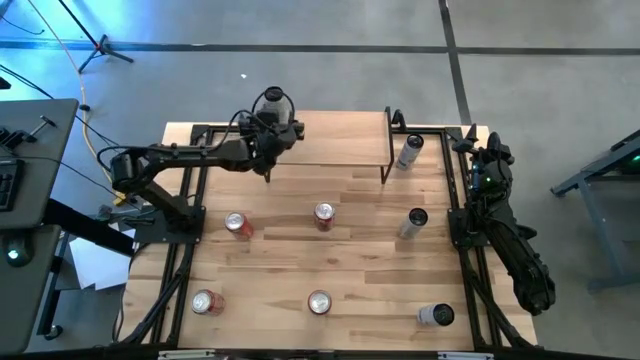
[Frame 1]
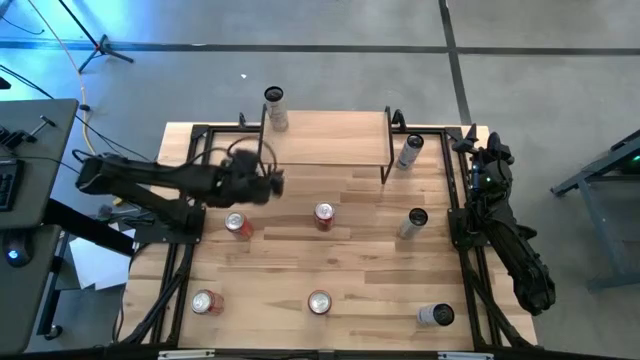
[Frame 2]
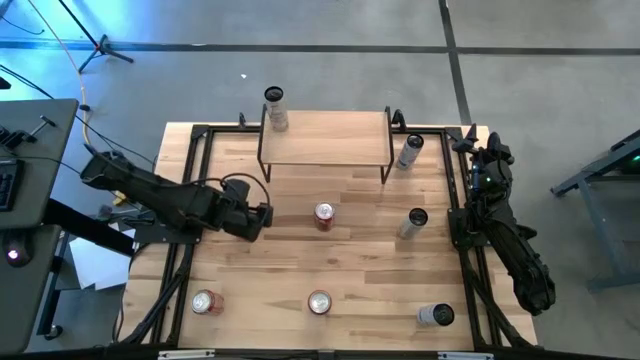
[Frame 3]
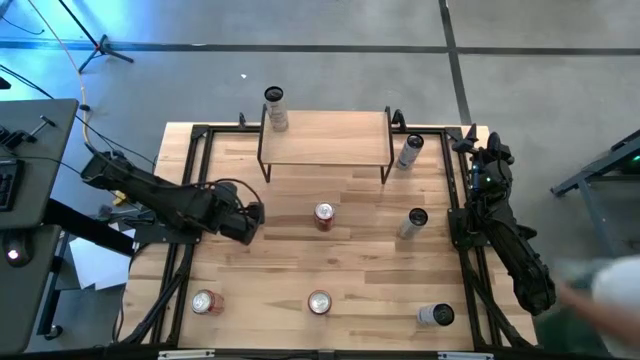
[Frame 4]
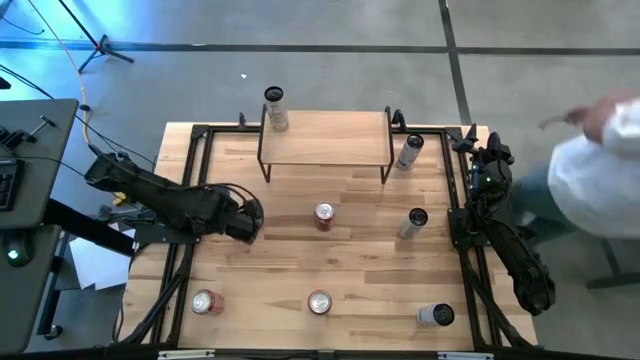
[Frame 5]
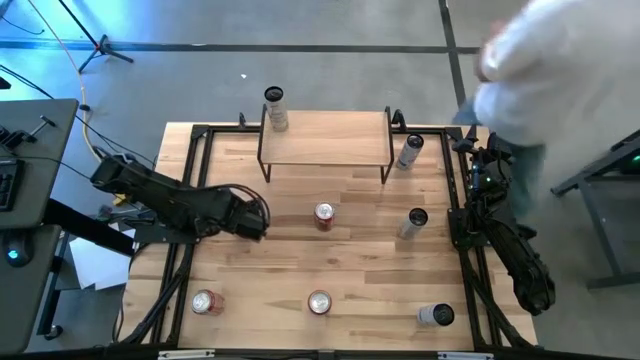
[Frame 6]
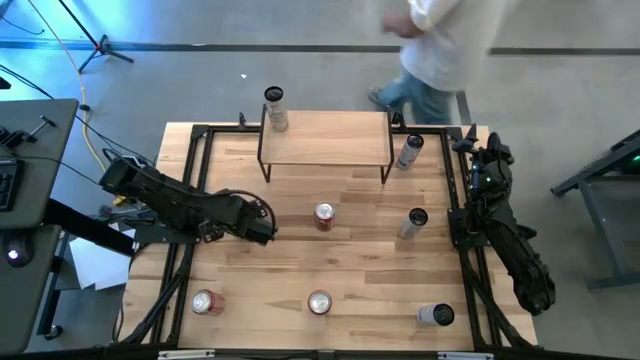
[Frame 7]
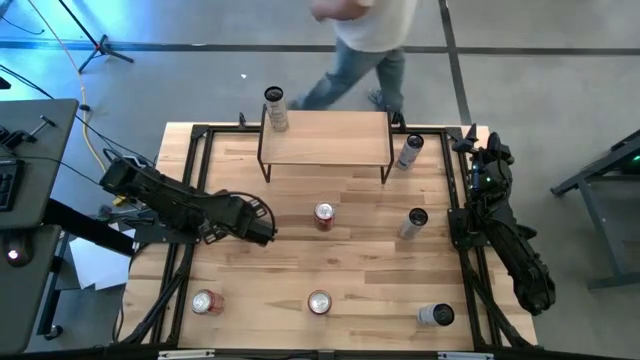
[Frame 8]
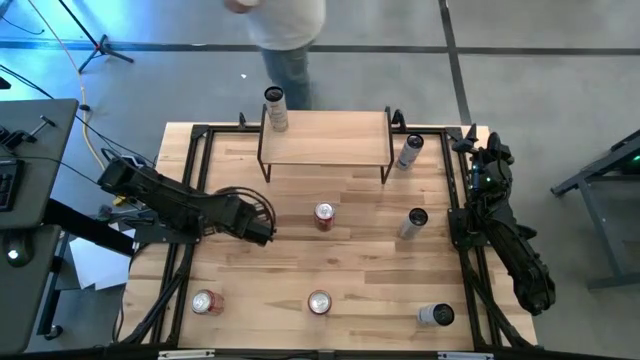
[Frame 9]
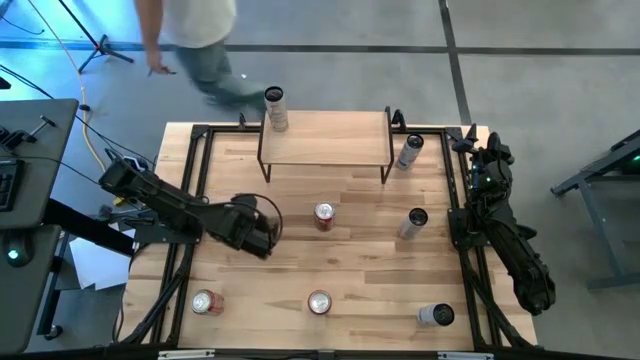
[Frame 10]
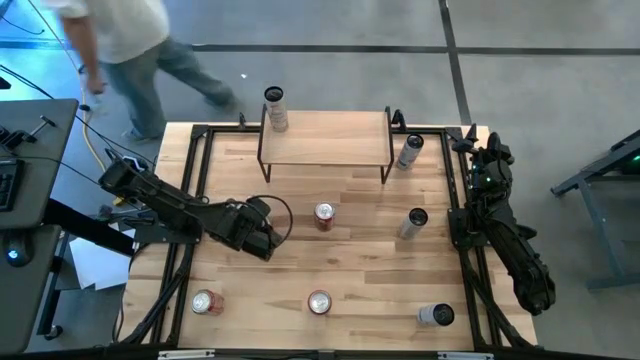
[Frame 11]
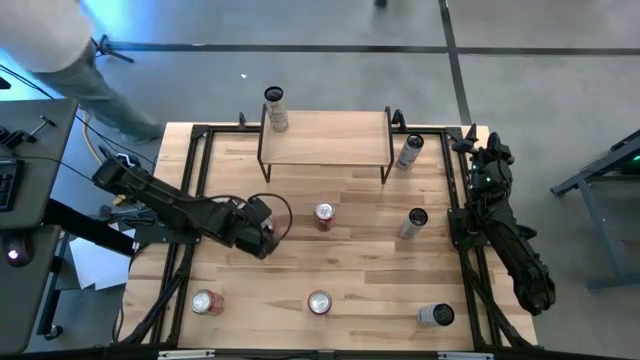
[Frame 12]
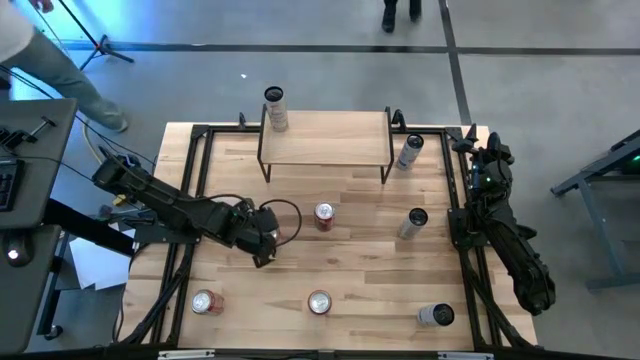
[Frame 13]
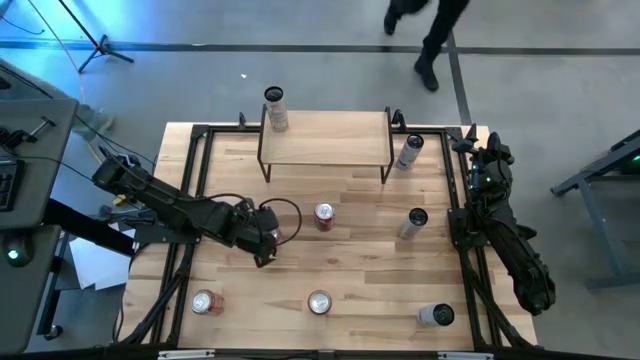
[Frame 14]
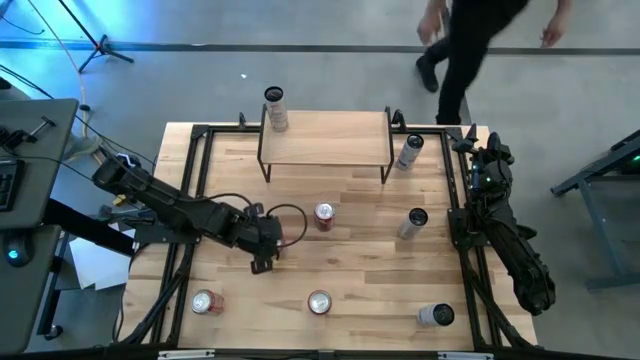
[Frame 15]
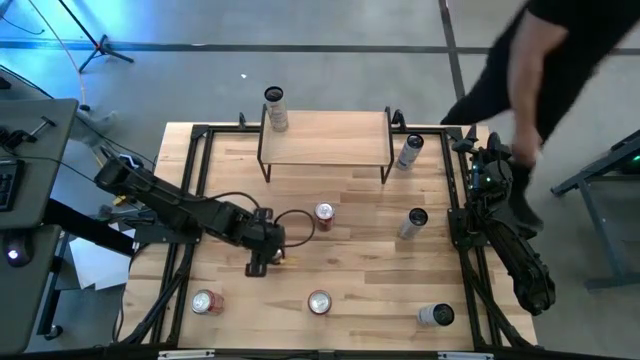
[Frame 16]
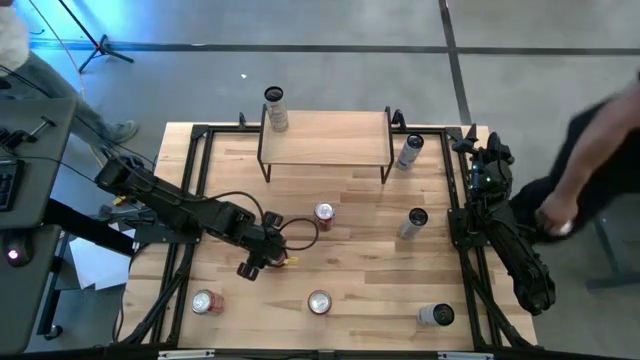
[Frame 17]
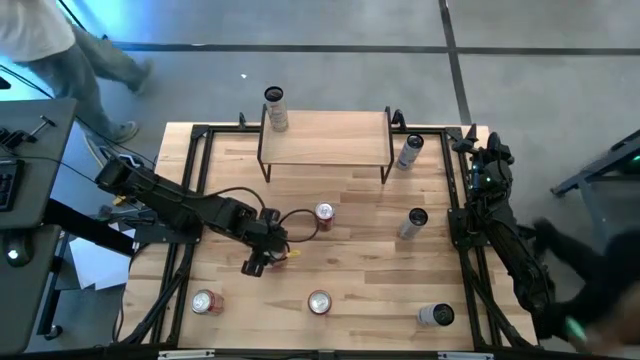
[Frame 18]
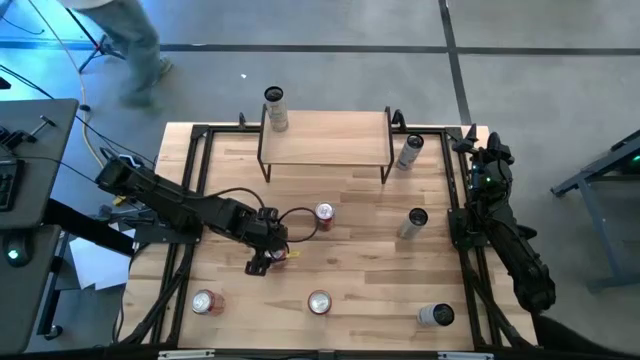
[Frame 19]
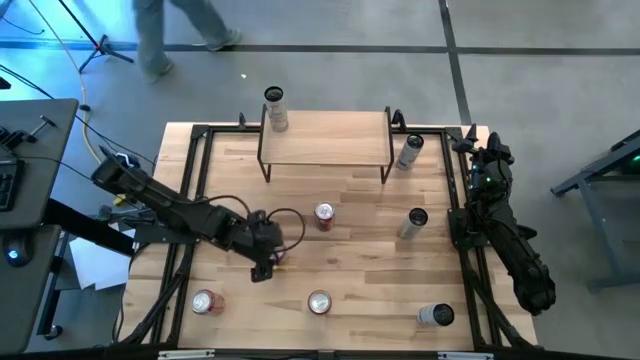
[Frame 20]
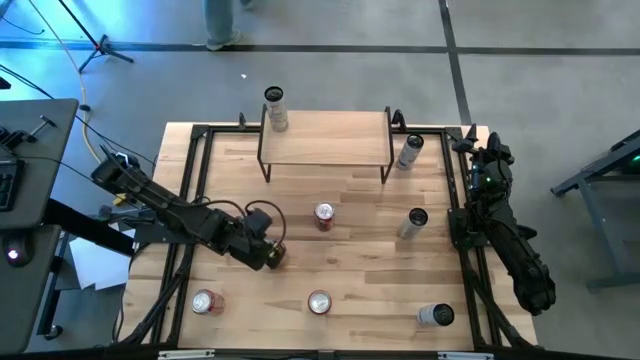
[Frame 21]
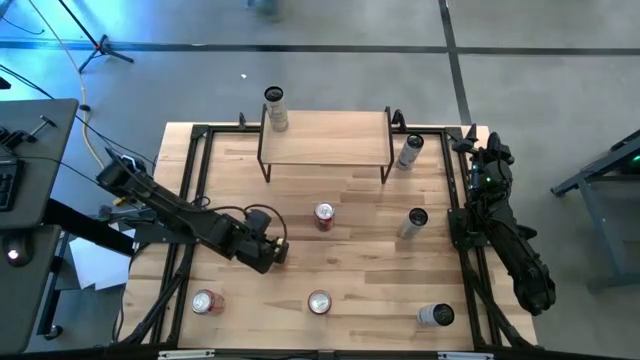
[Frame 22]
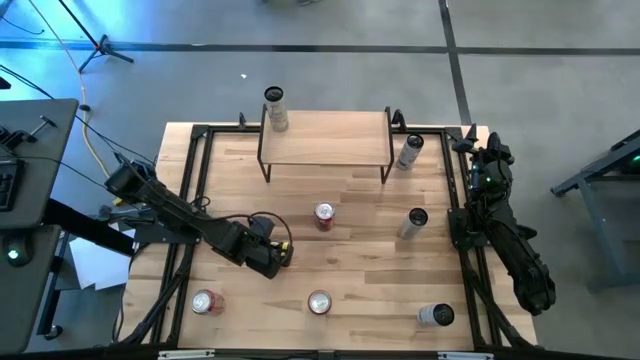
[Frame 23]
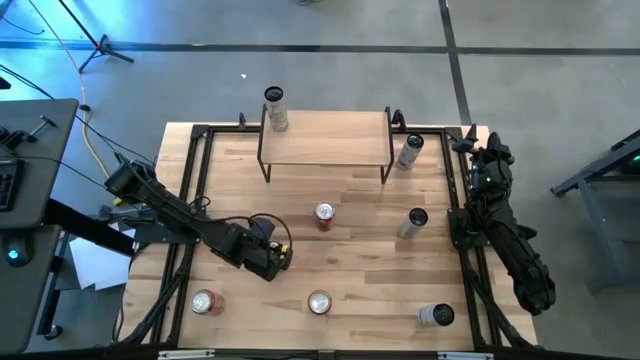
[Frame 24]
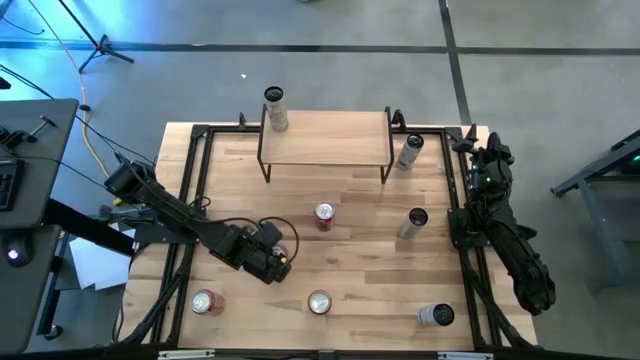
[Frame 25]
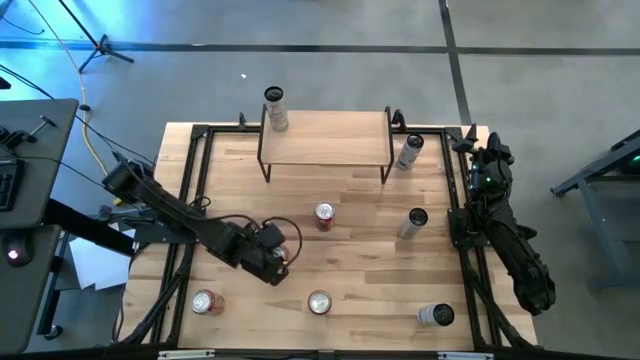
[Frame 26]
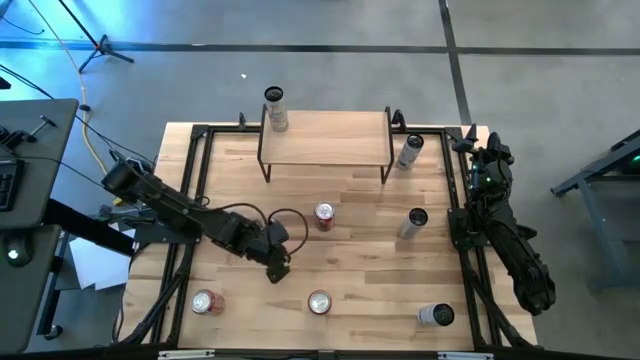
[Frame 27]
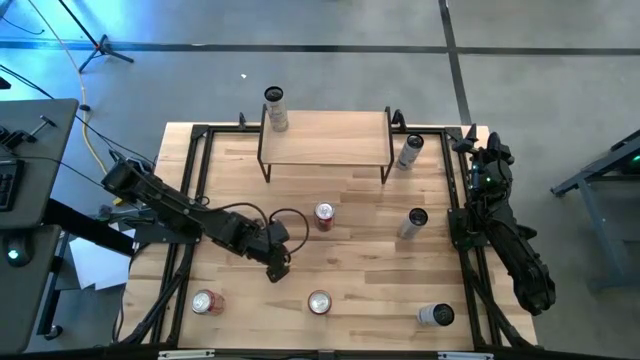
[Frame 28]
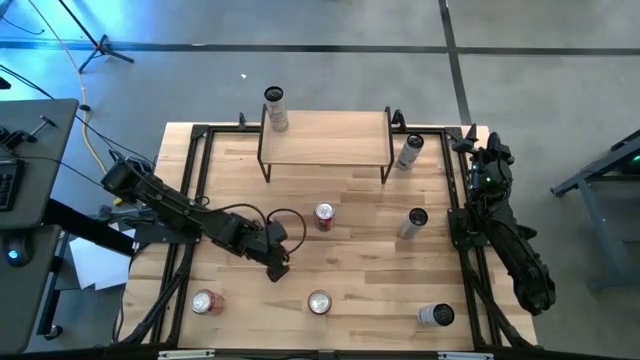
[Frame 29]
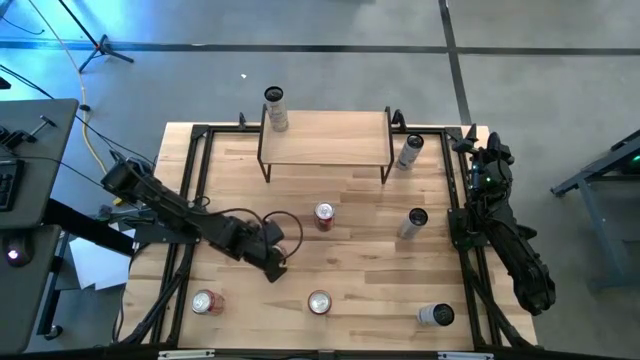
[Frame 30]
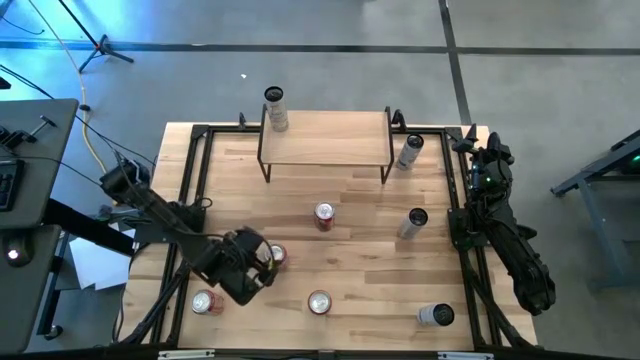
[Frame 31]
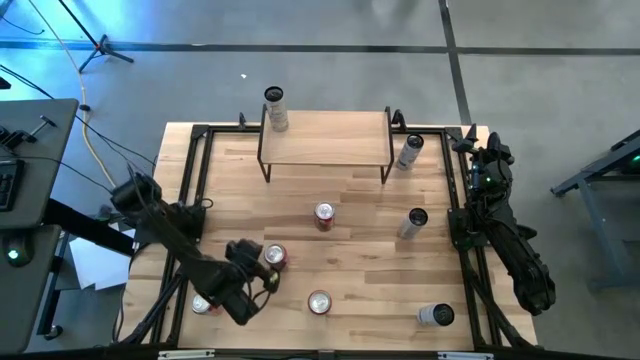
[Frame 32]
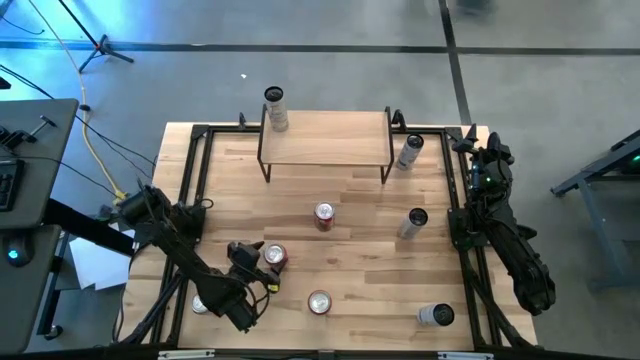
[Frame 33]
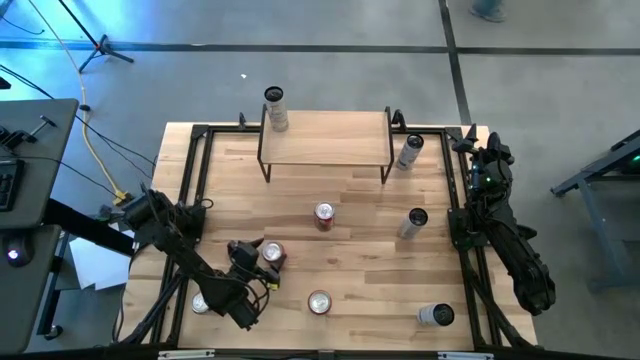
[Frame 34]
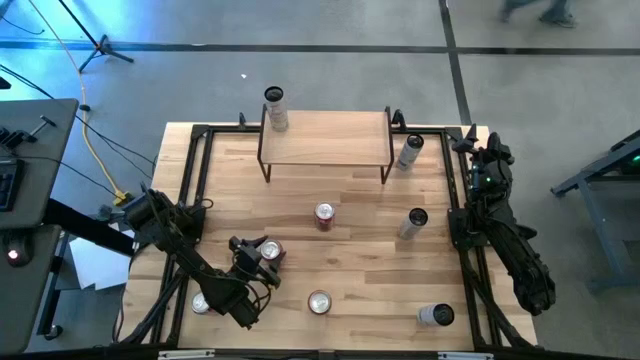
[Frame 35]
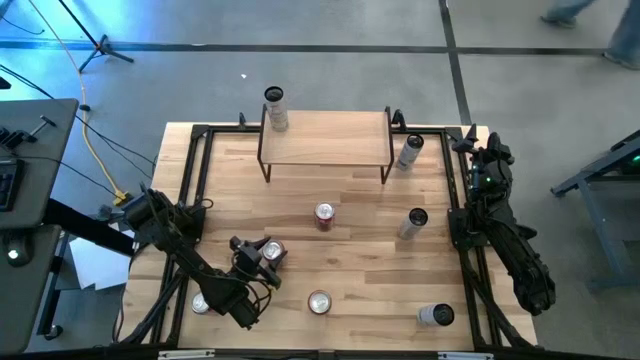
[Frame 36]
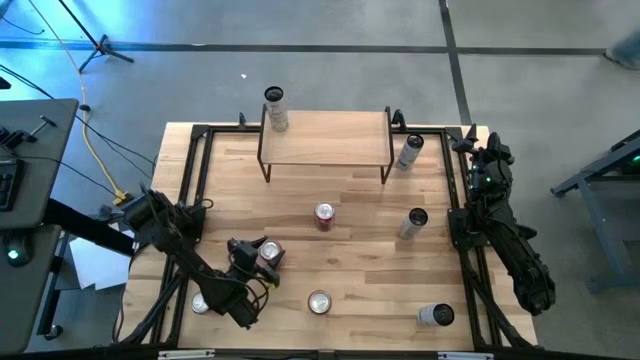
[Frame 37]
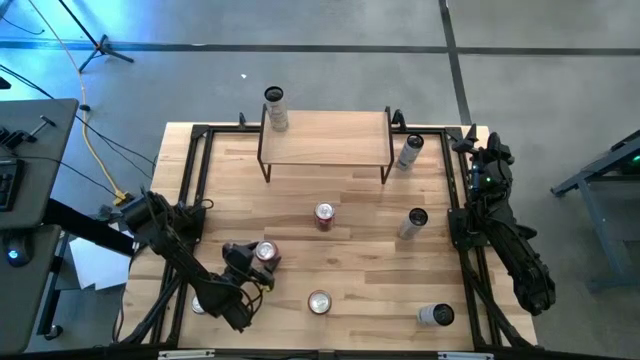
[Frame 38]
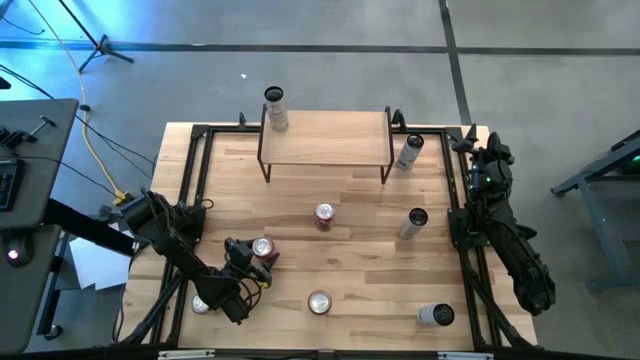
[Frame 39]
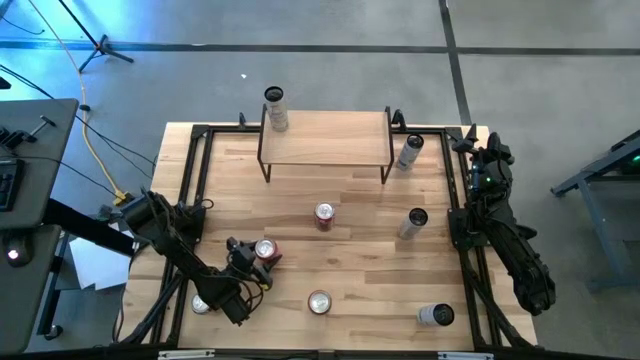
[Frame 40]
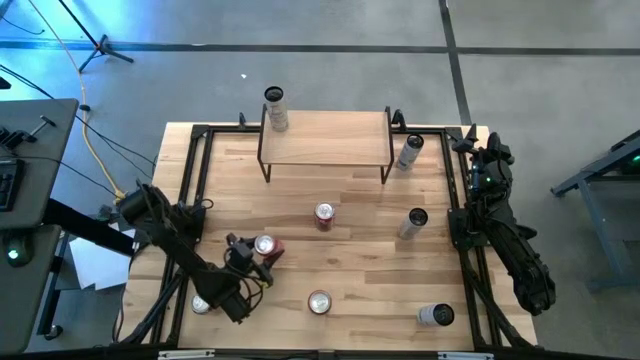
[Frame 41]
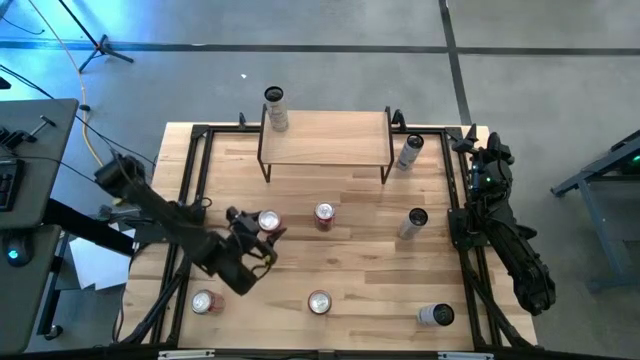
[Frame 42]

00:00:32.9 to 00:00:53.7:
Task: Place canned beverage on shelf
Put the red soda can on the shelf
